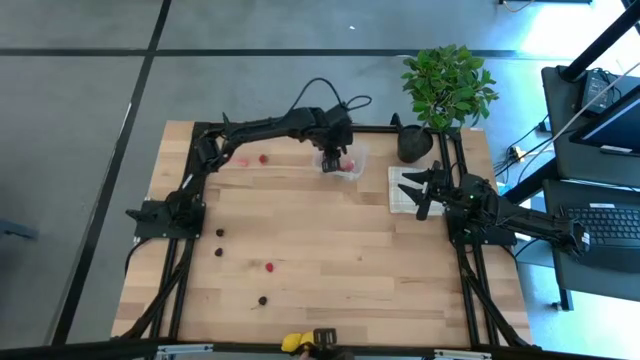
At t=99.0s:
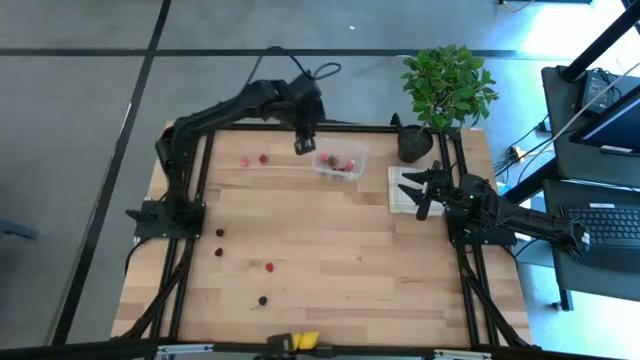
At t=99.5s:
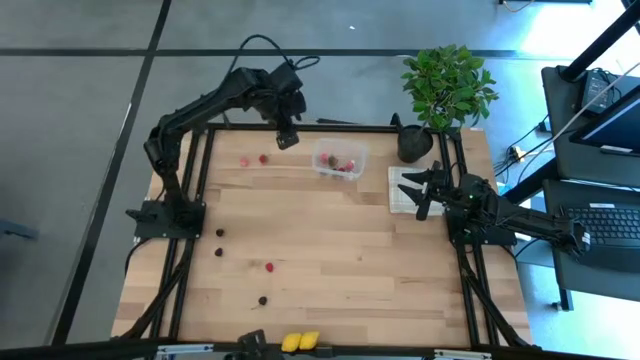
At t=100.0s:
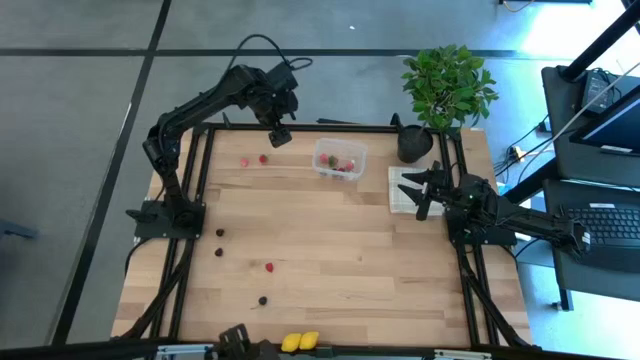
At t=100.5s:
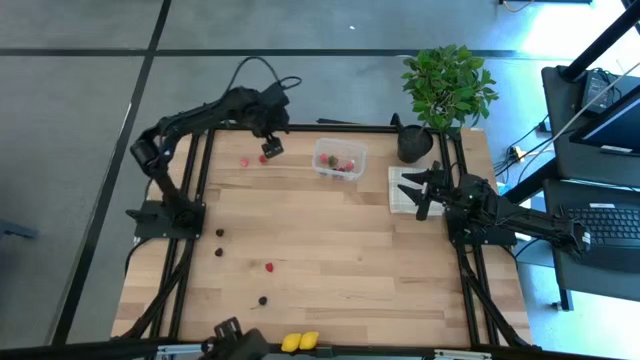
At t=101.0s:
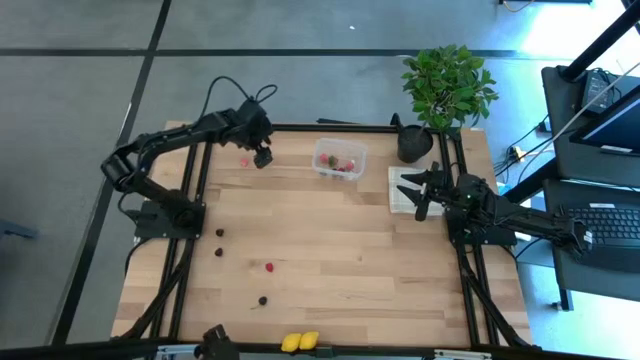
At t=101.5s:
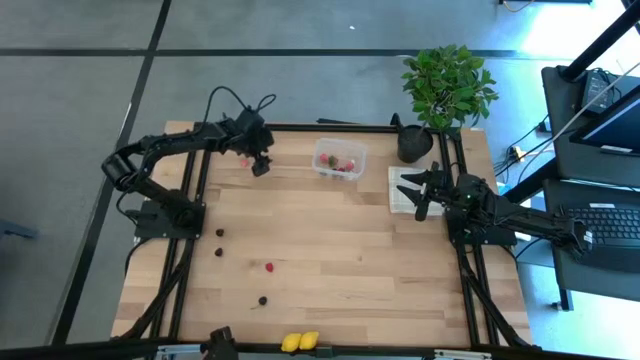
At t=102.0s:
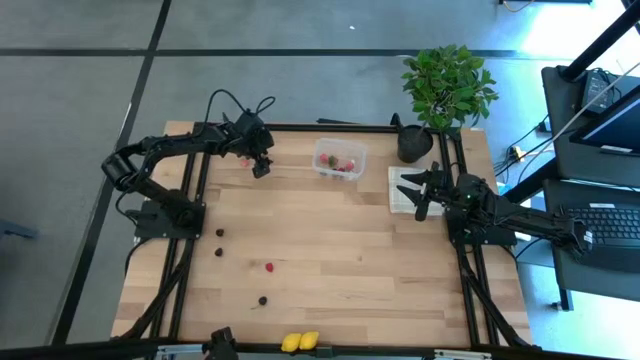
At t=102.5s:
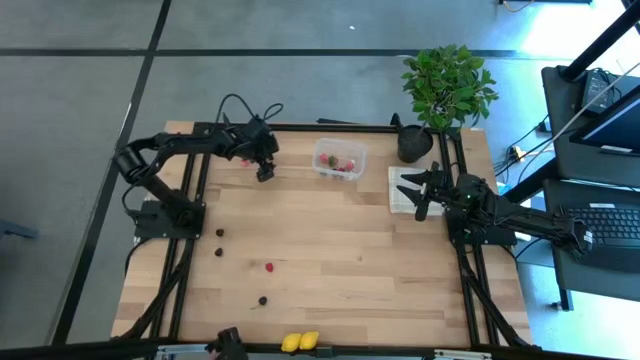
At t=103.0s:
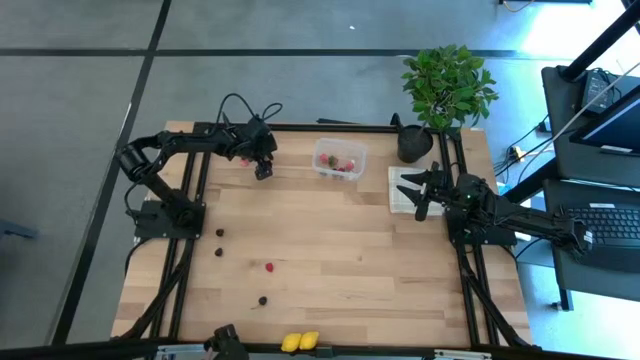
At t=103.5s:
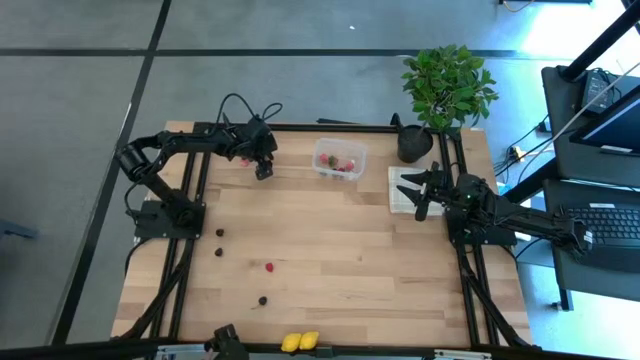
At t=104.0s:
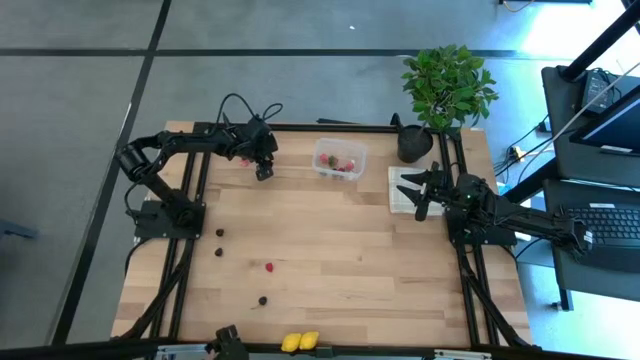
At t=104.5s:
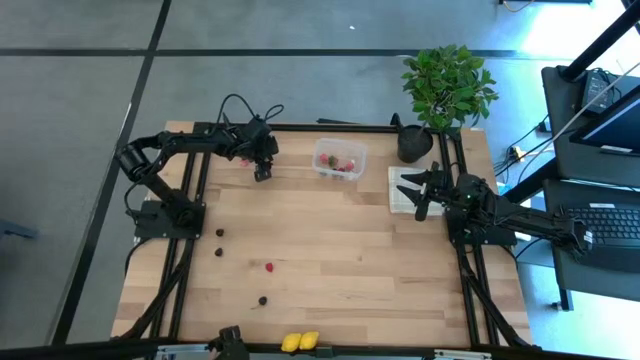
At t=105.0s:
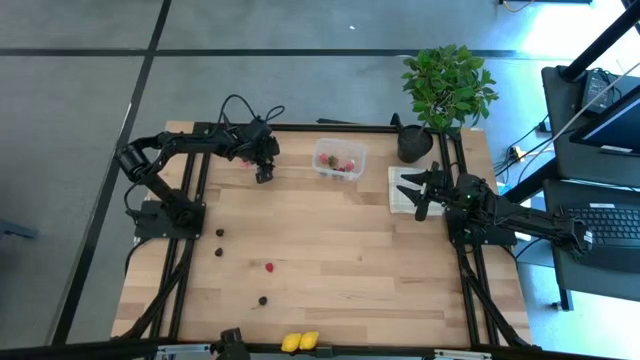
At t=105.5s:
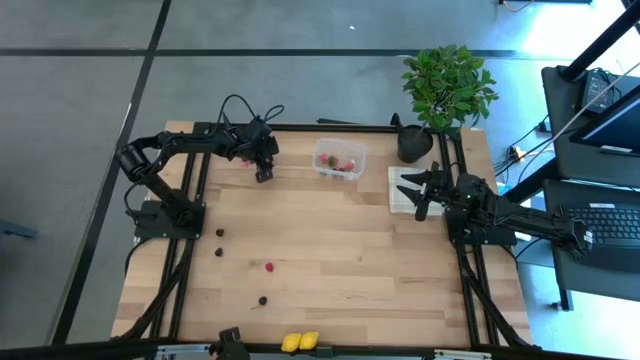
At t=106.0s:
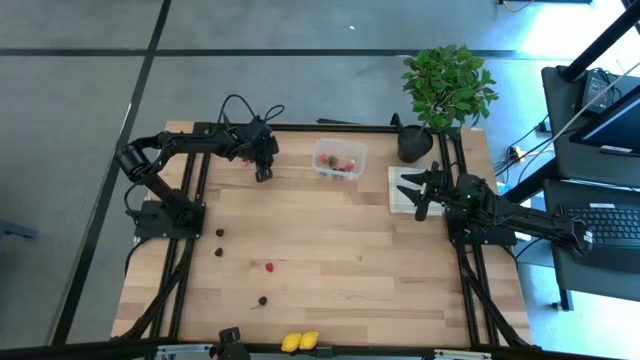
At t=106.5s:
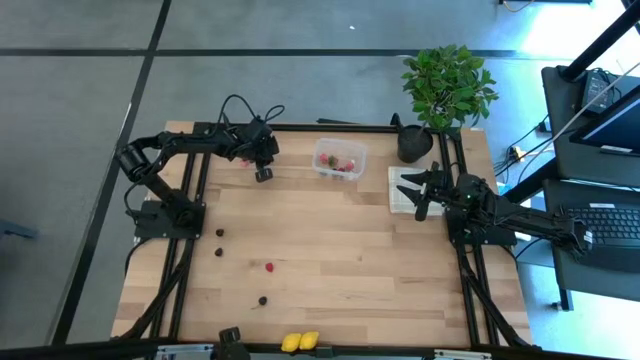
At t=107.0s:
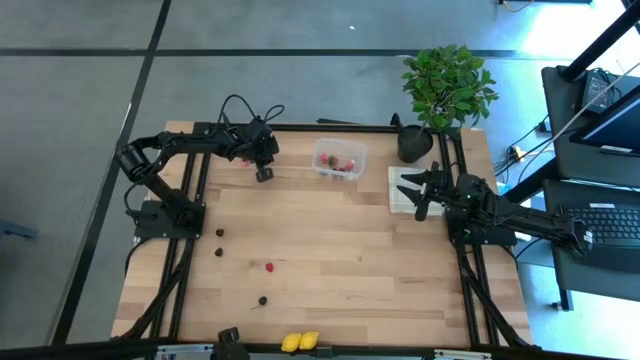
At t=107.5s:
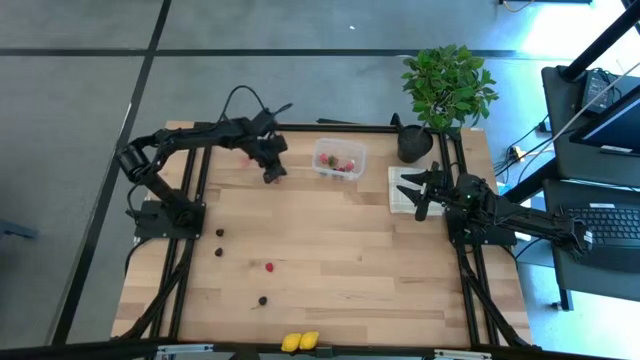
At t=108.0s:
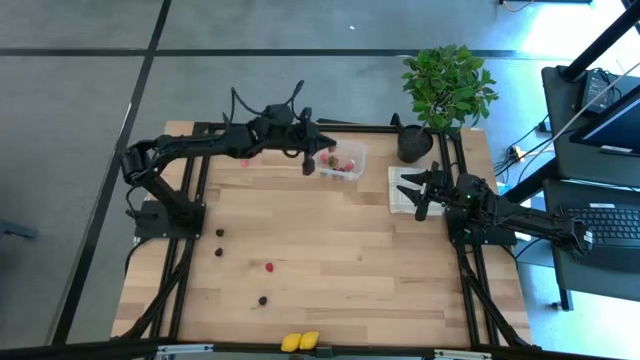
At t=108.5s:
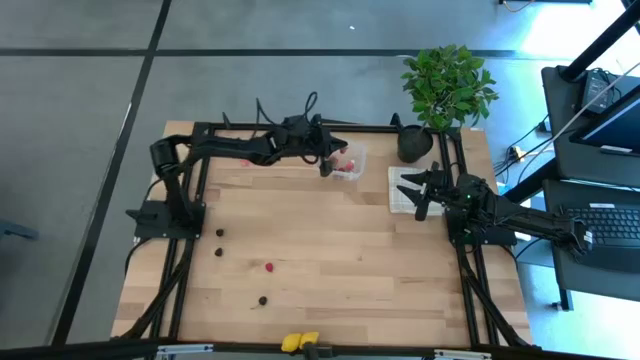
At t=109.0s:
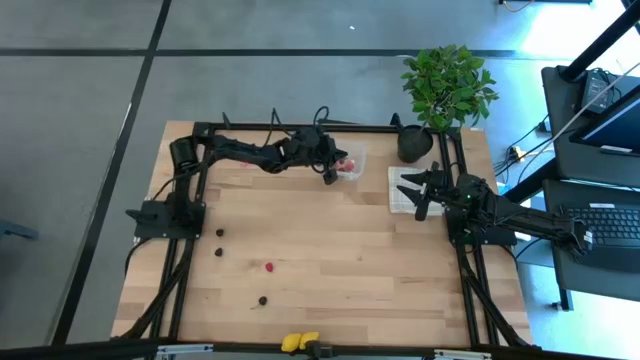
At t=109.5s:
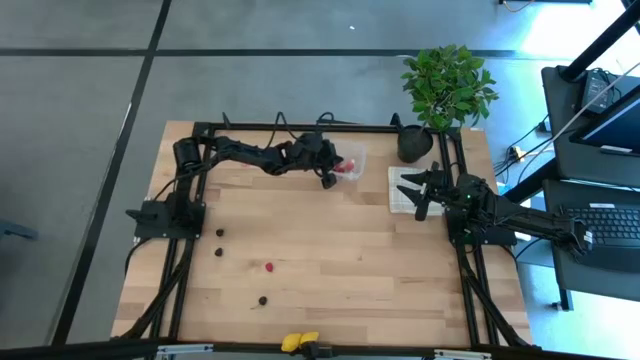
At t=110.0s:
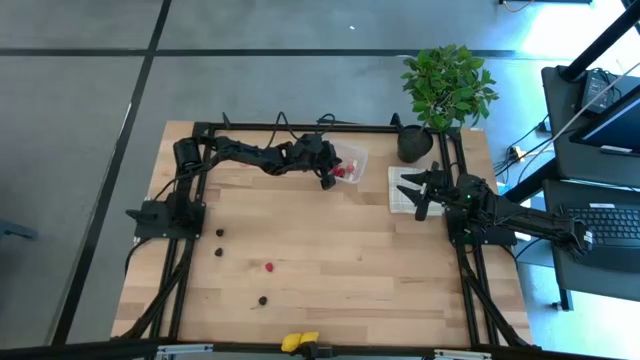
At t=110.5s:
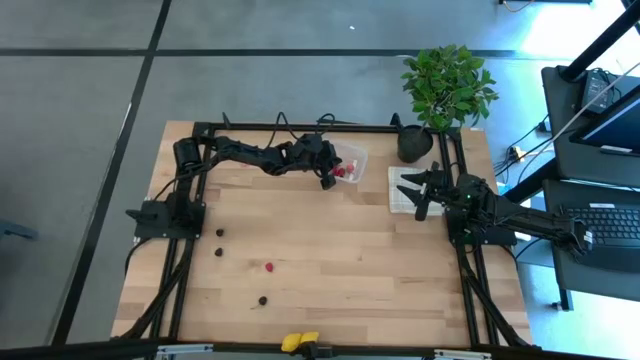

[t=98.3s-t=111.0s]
Task: Pick and placing Produce into tupperware
Put the strawberry into the transparent container

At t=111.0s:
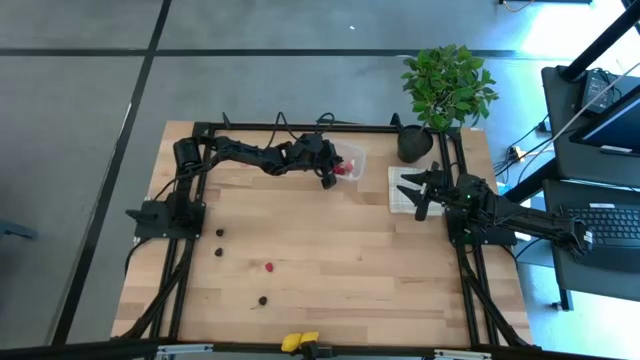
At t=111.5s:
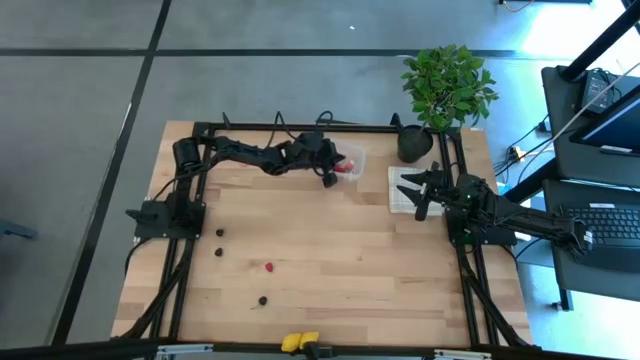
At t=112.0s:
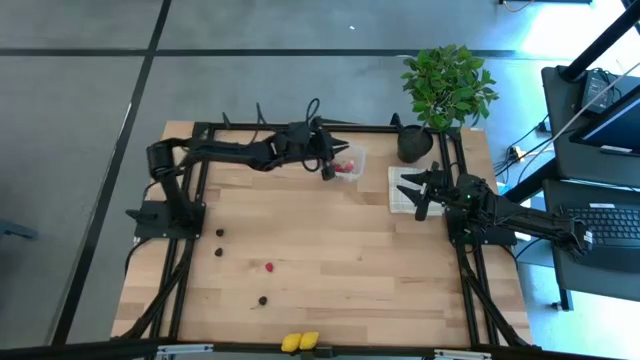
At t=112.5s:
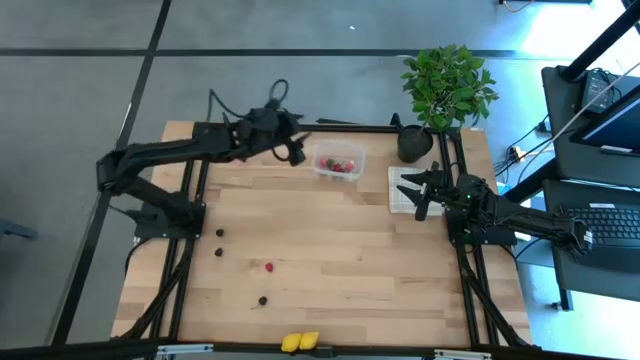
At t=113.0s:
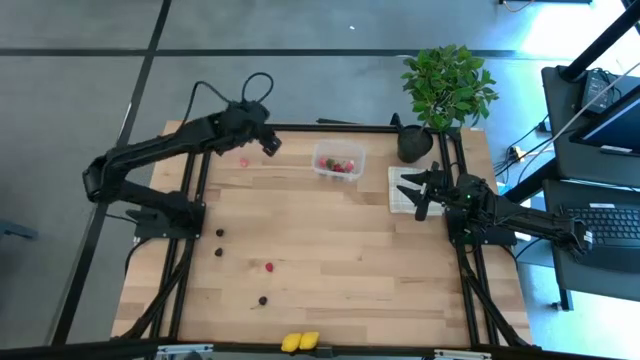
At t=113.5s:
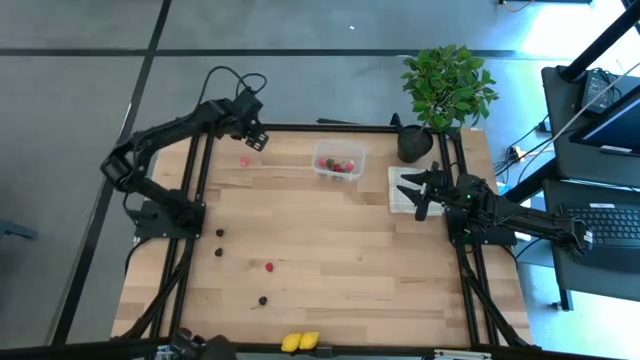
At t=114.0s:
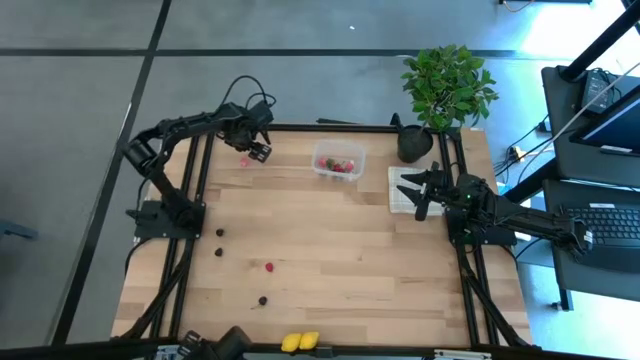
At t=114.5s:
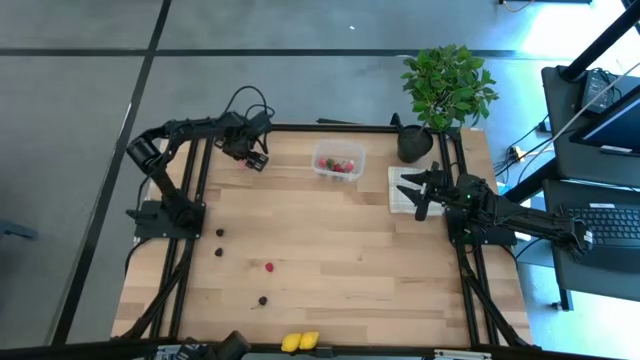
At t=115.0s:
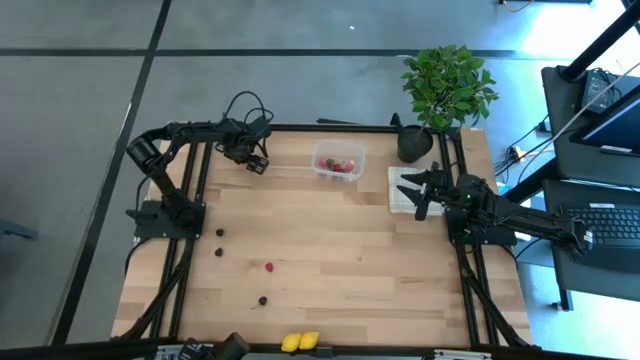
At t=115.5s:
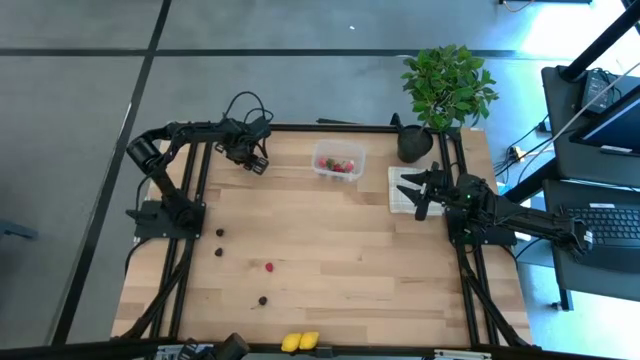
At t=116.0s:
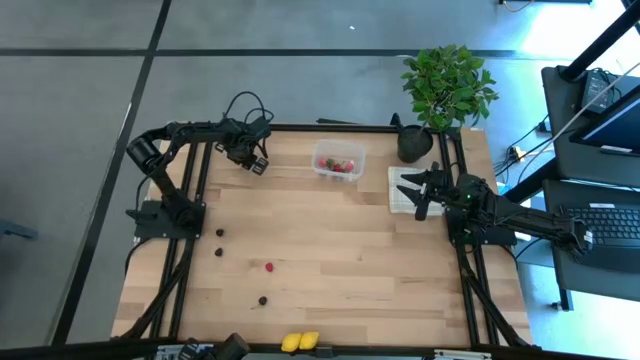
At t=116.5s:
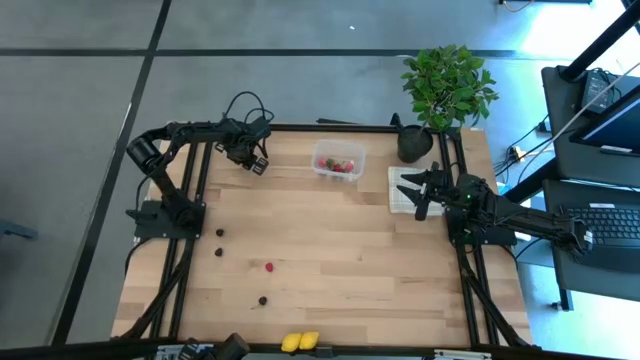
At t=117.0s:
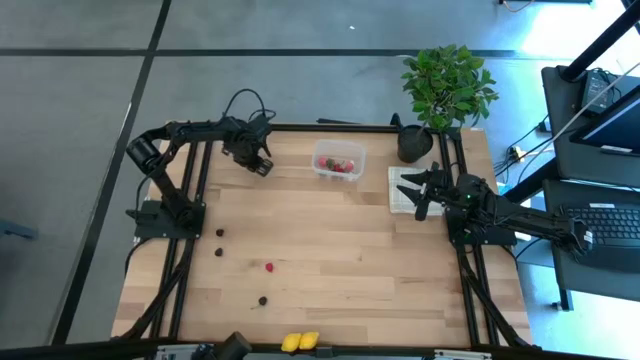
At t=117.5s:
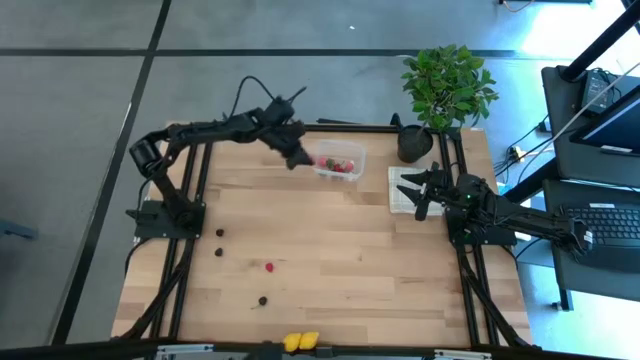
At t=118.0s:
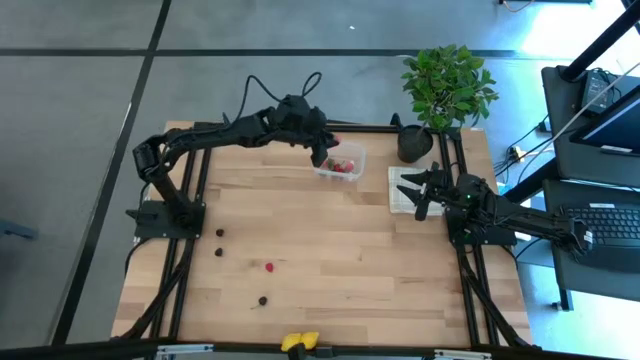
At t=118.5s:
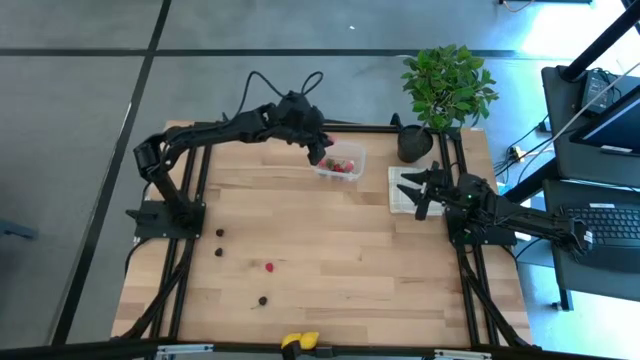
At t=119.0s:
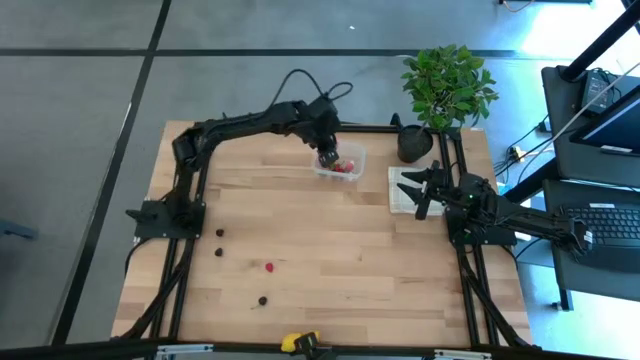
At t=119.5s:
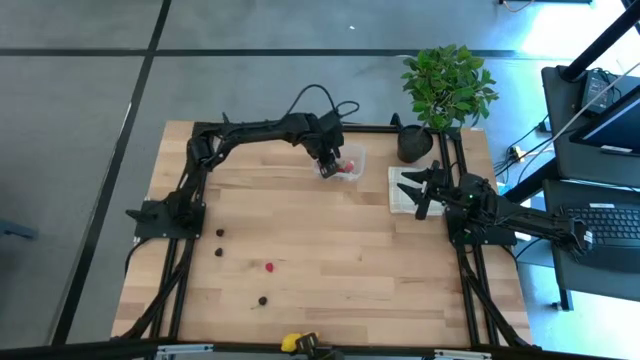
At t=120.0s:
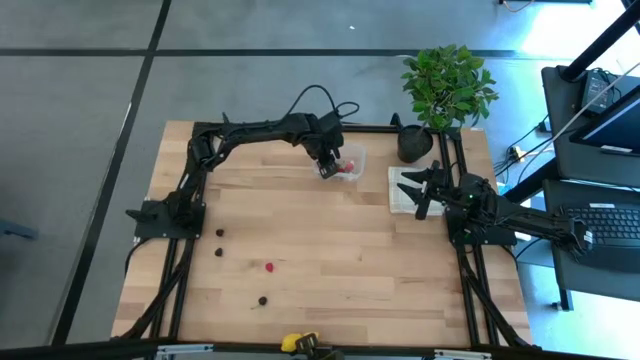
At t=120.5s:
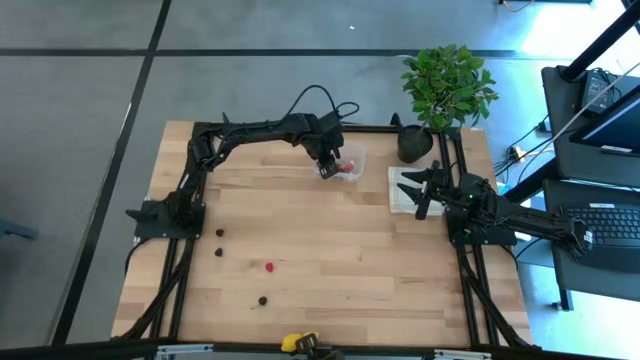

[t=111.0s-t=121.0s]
Put the peach into the transparent container
